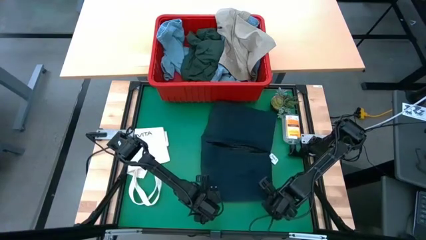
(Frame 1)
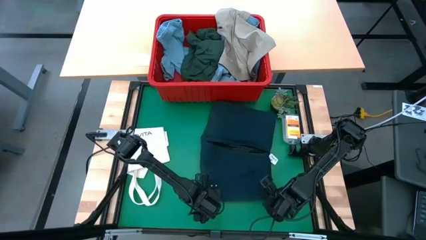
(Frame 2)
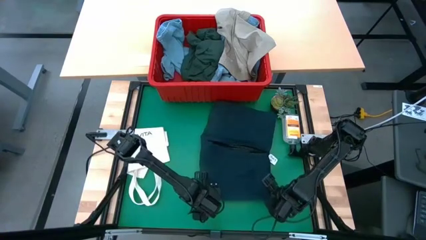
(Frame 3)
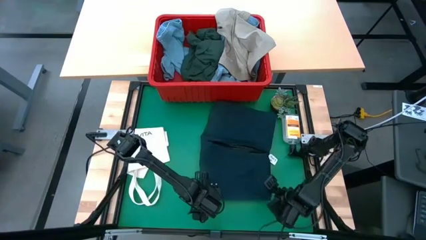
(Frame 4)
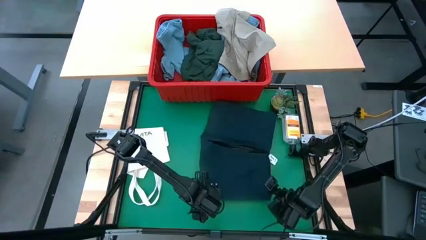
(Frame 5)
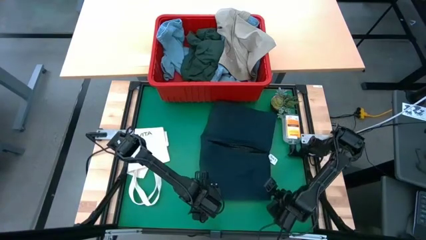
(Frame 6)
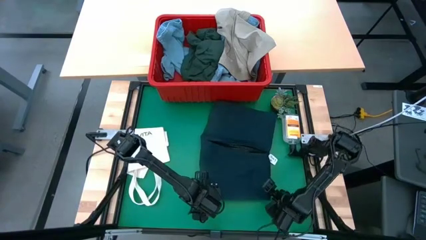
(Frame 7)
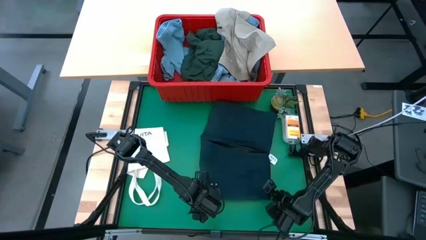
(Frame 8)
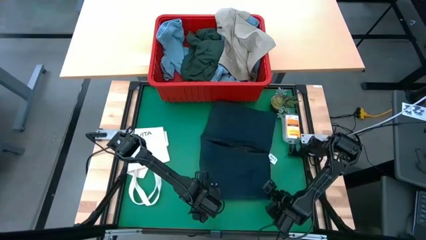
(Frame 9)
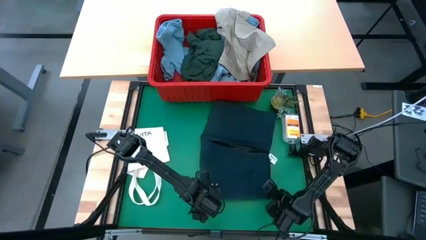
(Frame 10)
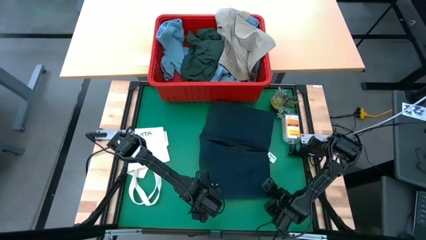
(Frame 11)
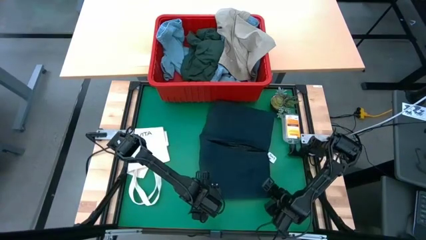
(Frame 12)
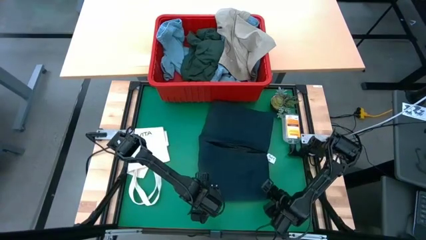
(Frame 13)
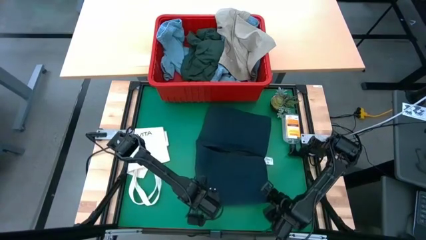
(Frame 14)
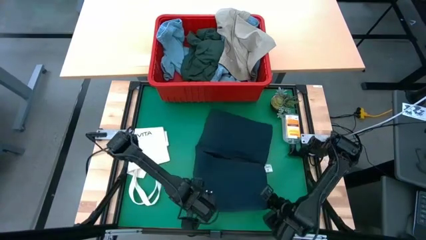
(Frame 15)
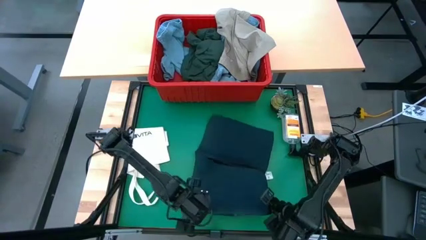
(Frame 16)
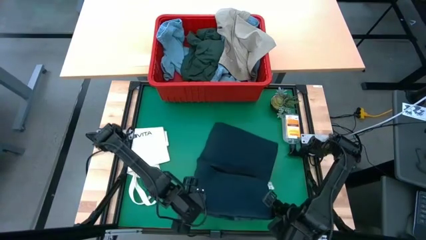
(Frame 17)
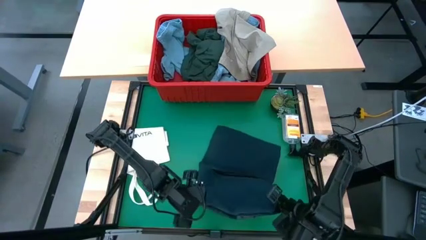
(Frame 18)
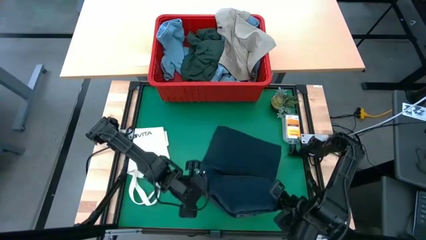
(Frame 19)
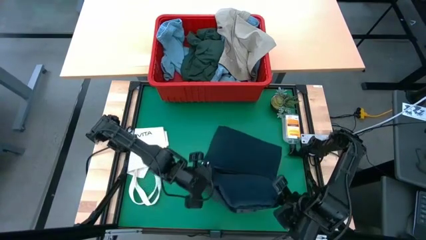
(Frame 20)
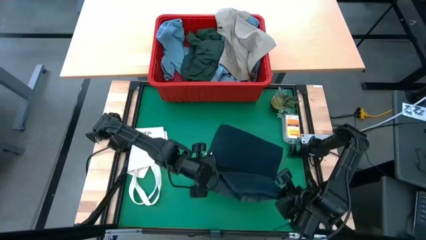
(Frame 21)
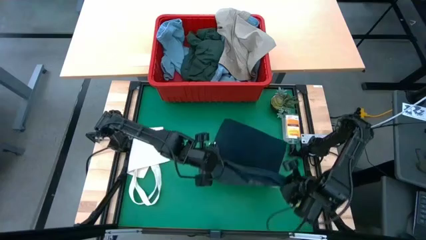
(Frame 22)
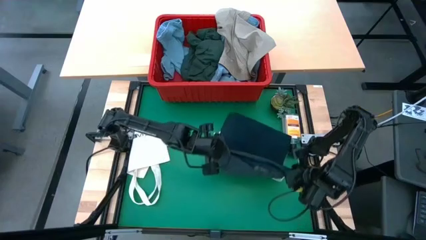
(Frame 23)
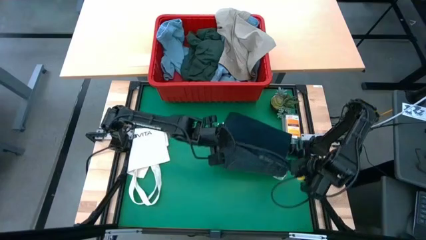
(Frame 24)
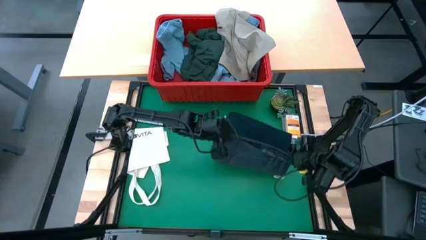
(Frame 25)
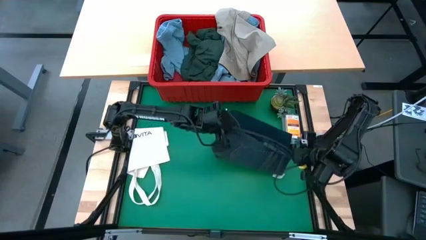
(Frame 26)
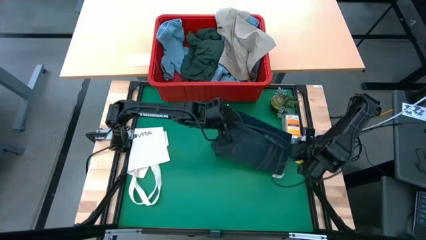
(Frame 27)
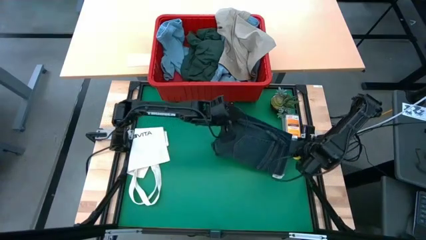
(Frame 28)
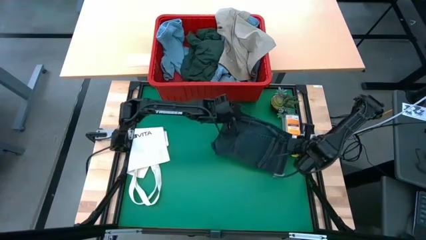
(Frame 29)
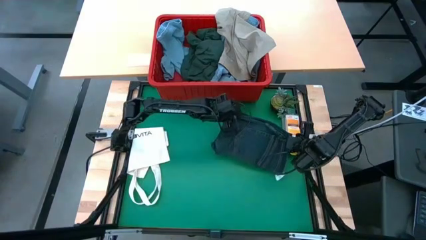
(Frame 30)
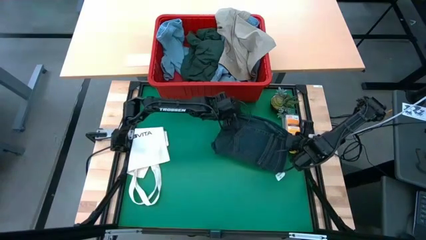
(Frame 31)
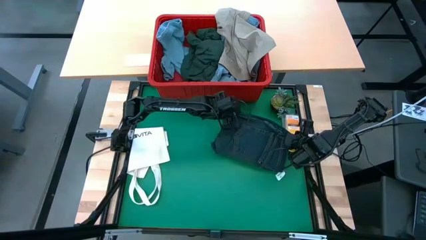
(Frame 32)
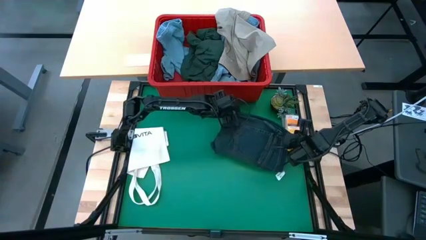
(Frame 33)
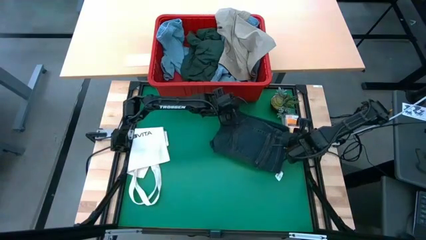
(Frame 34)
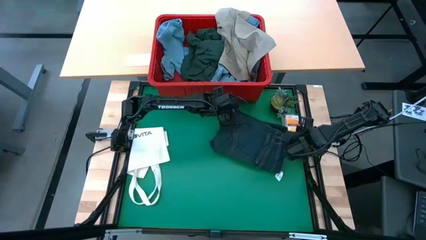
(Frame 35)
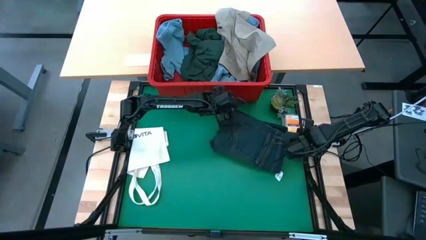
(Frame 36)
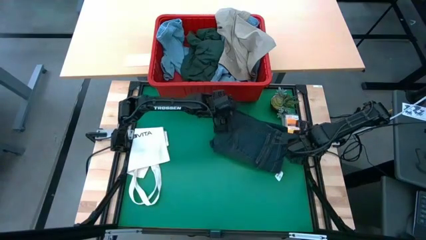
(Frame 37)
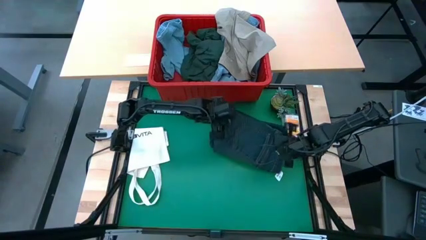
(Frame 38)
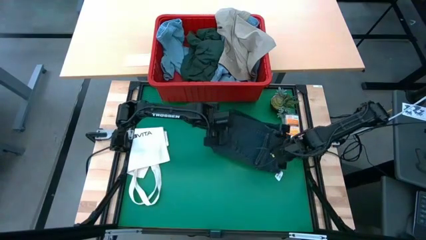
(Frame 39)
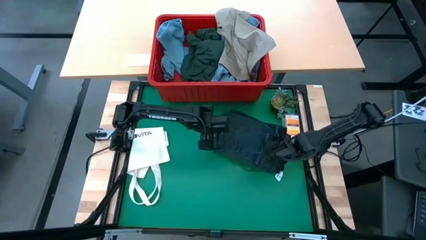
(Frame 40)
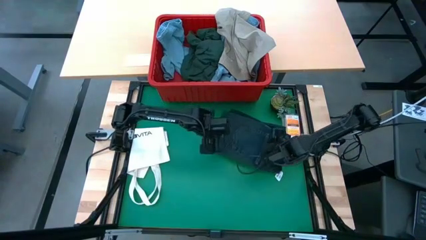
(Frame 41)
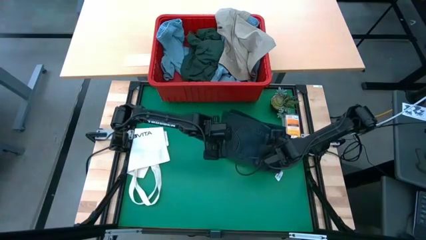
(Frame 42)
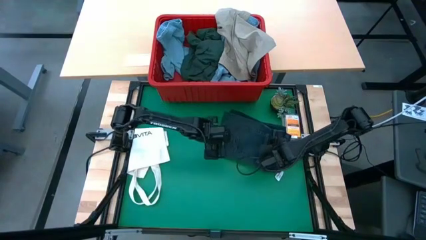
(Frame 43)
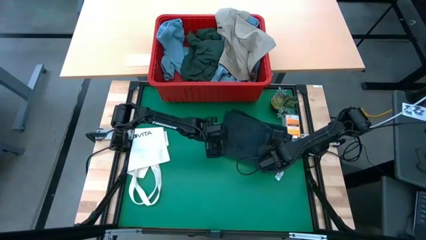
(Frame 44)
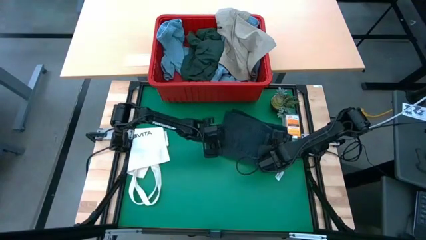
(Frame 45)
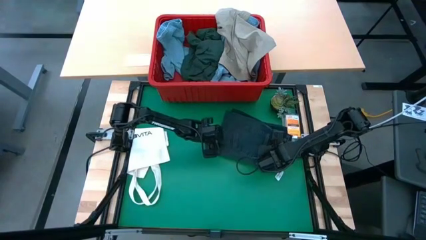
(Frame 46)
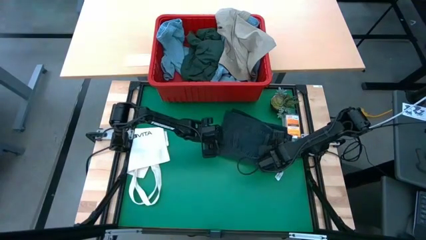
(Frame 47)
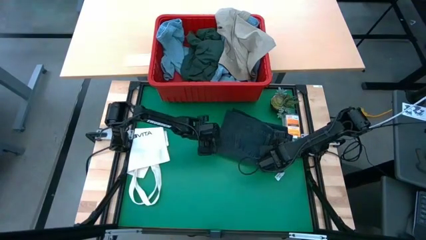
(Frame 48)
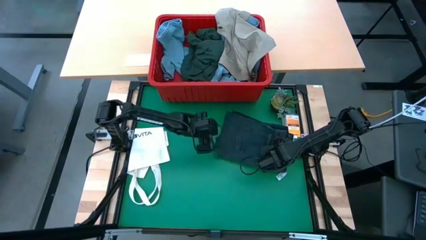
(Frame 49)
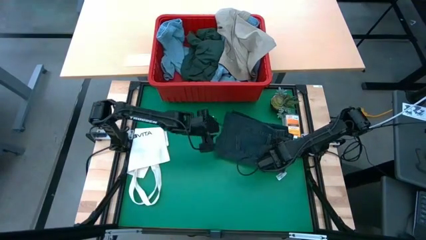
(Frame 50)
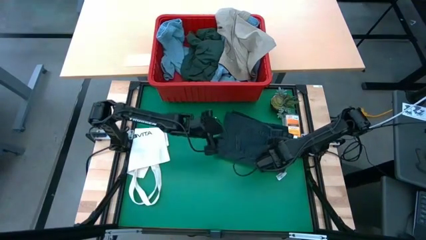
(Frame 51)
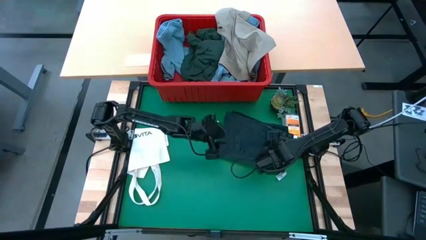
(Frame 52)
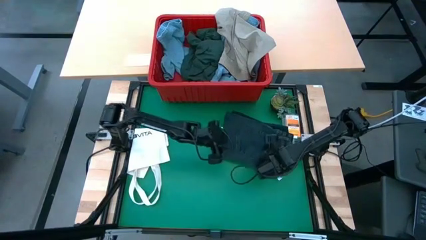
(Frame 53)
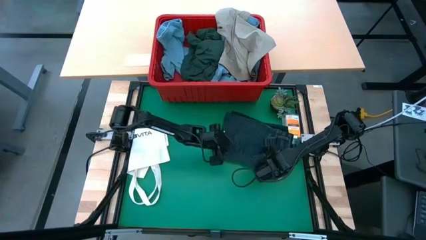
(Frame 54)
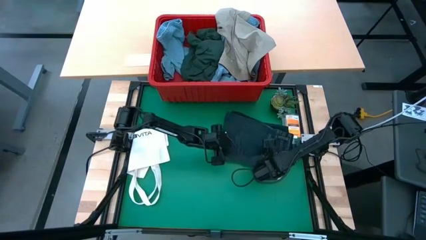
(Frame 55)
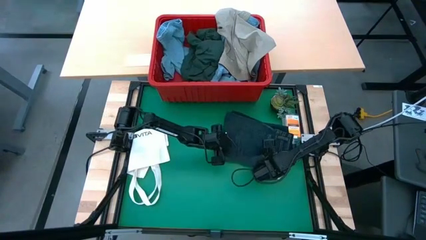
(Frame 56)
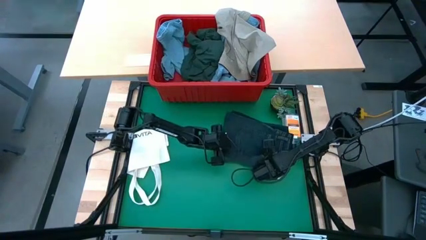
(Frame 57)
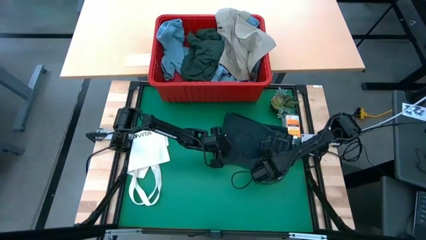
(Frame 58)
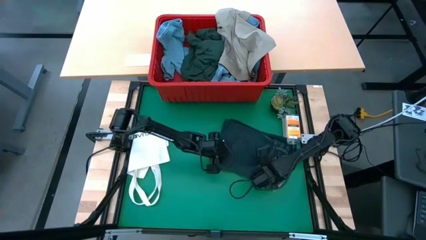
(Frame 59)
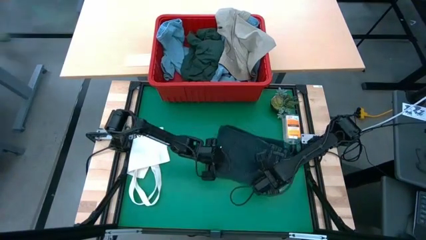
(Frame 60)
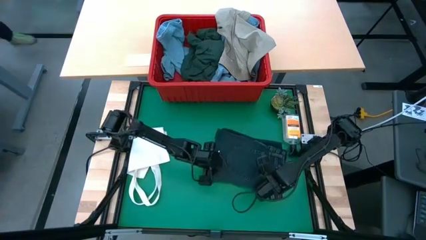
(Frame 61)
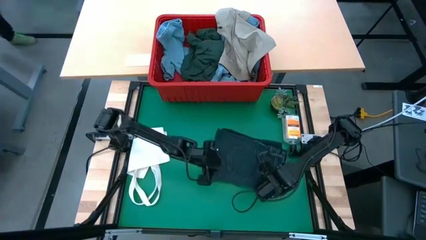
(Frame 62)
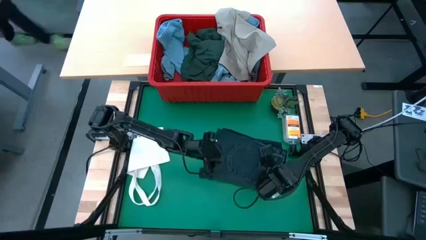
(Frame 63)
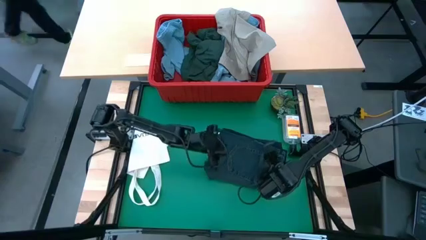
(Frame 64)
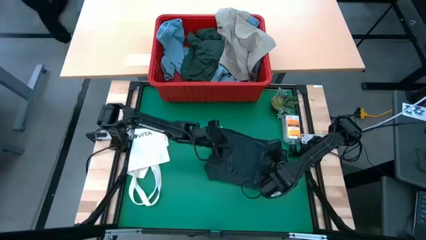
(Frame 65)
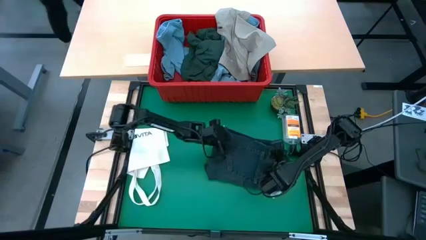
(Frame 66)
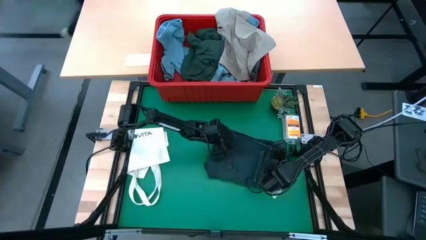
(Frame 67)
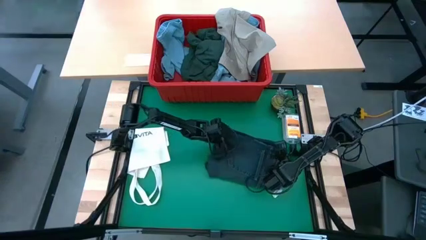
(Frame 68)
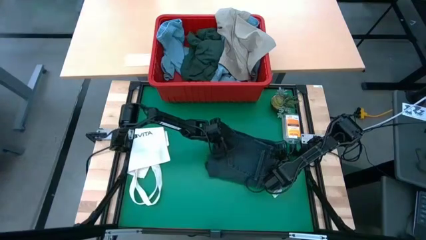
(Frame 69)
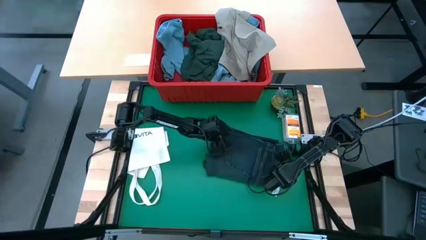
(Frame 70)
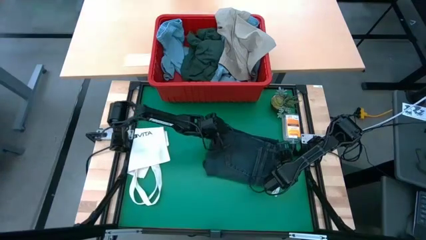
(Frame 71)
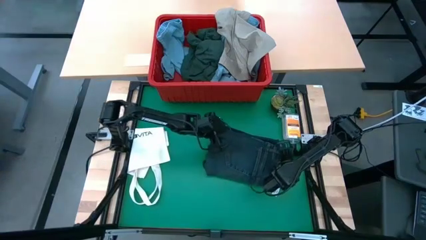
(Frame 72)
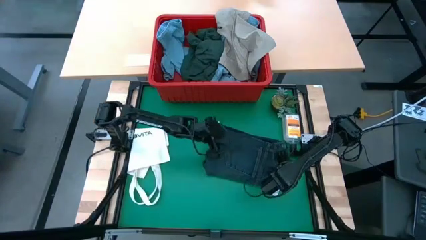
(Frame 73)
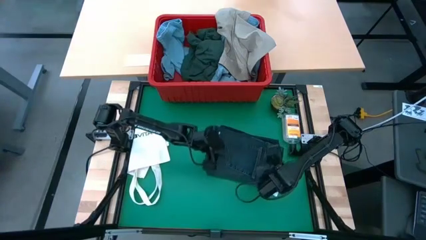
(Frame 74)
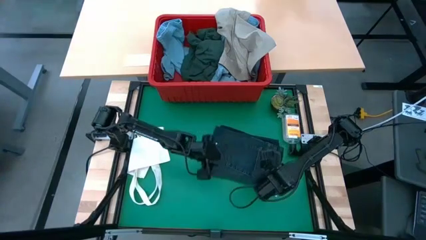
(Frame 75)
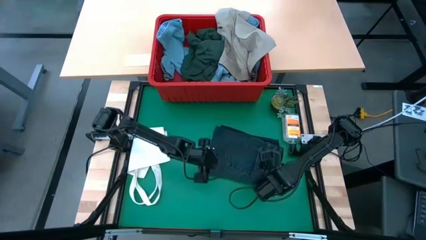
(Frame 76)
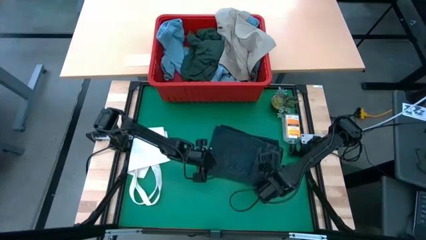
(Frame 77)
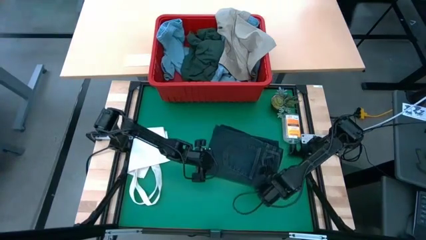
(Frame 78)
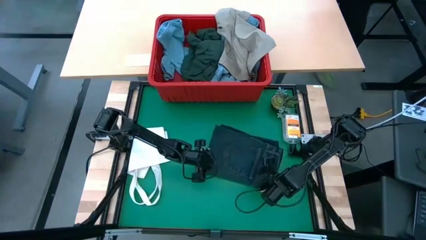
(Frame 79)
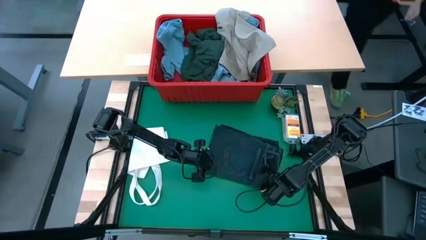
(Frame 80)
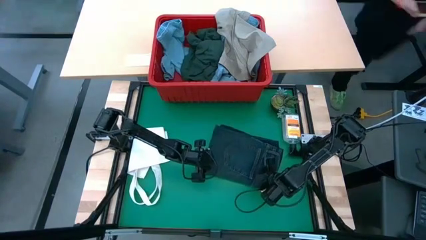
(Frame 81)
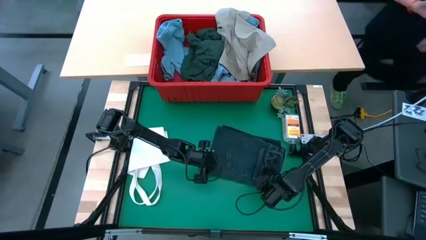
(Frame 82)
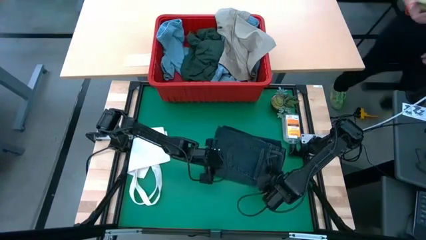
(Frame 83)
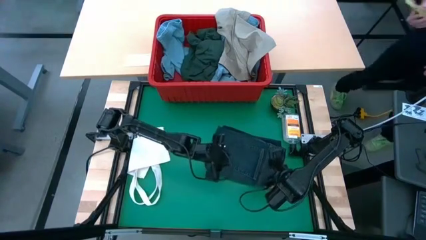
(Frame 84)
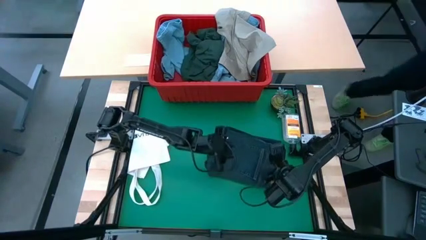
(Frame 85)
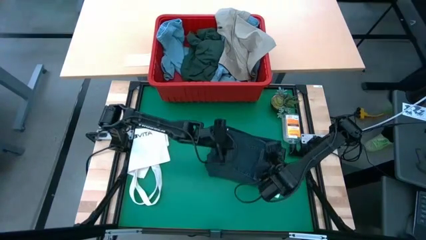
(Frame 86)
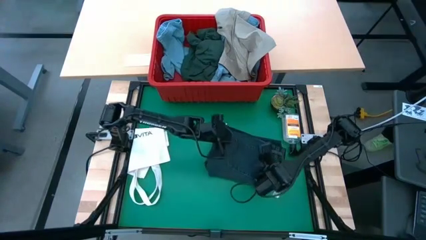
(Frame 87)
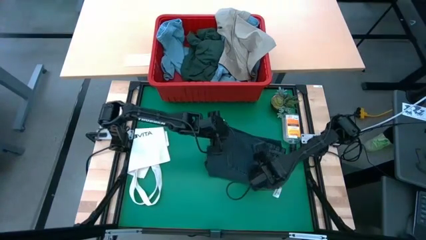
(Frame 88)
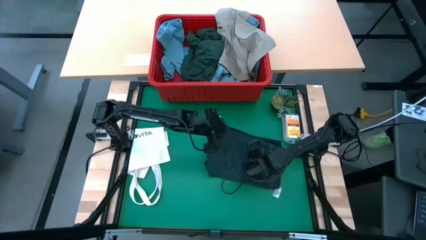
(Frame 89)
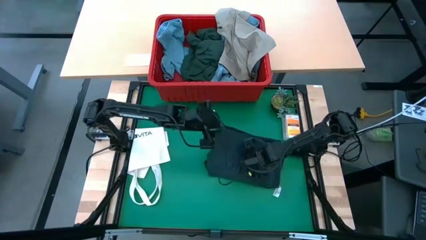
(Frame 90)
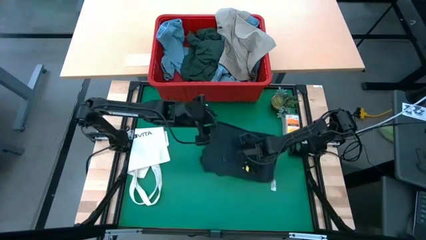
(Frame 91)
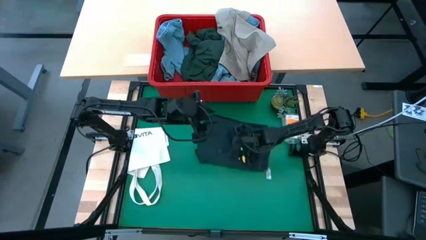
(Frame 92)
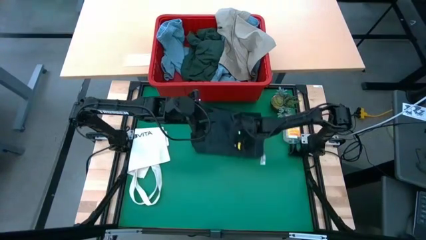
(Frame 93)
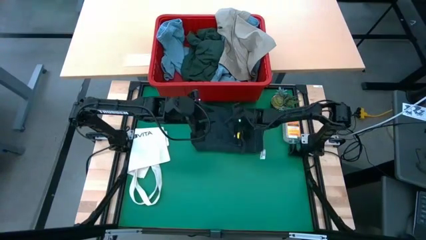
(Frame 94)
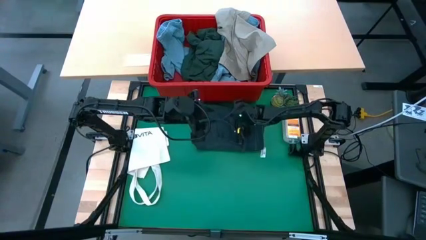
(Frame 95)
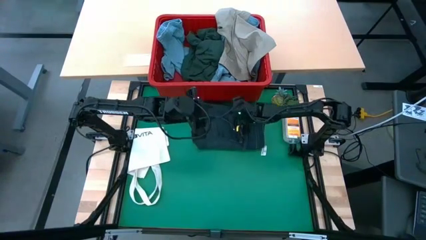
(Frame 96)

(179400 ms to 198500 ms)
Task: Fold laundry
Fold the dark blue pants
